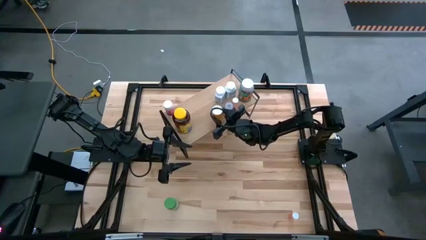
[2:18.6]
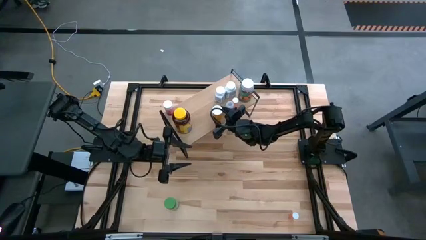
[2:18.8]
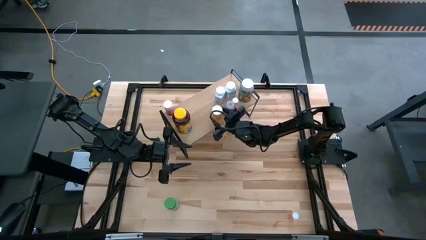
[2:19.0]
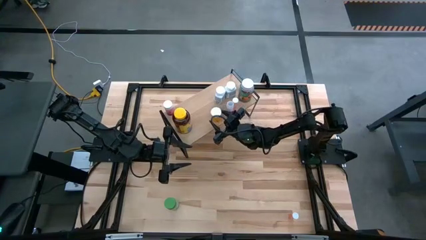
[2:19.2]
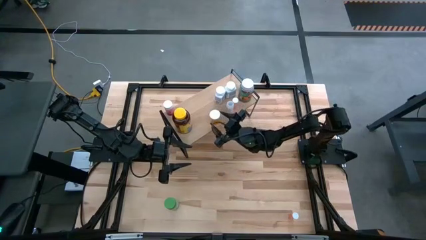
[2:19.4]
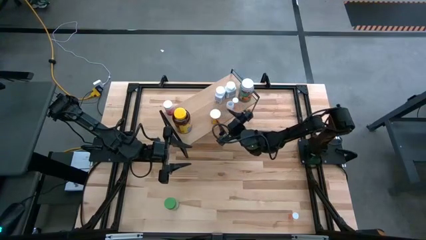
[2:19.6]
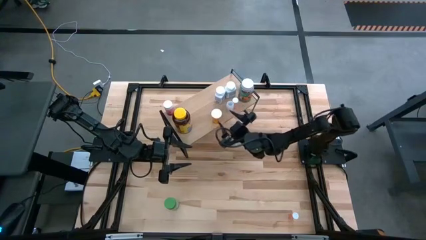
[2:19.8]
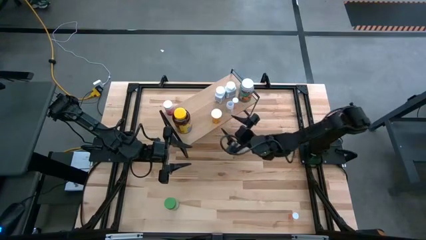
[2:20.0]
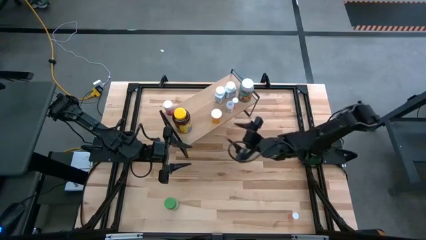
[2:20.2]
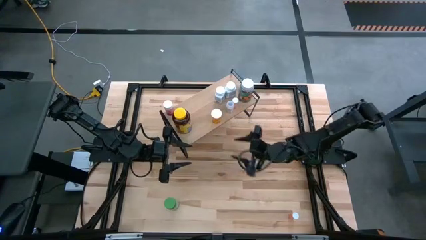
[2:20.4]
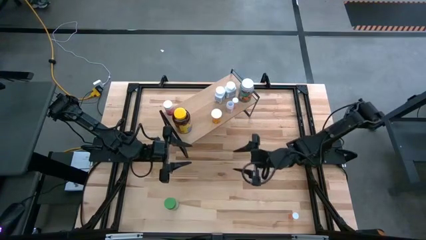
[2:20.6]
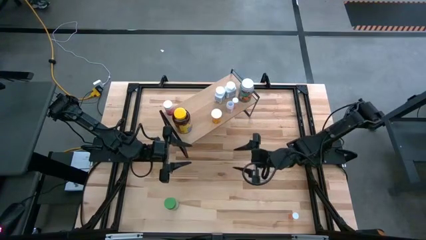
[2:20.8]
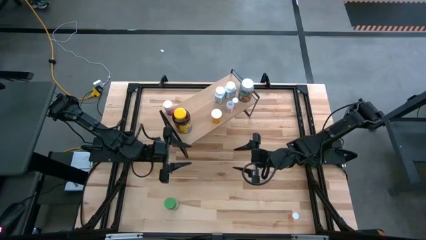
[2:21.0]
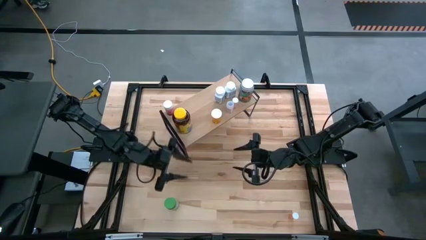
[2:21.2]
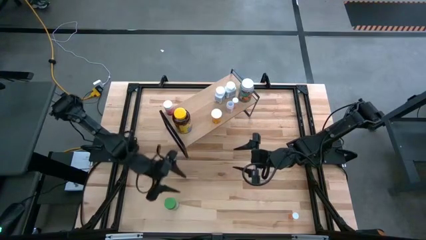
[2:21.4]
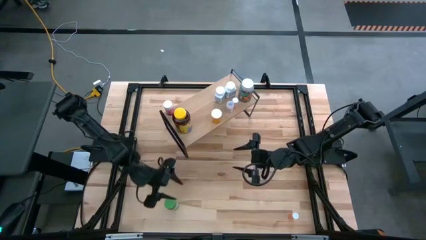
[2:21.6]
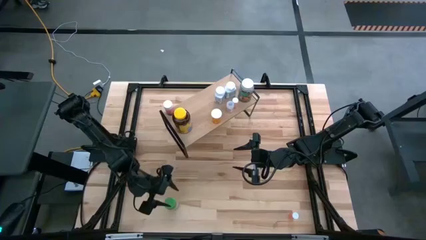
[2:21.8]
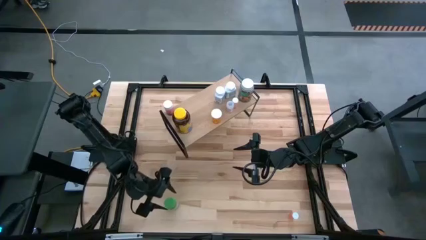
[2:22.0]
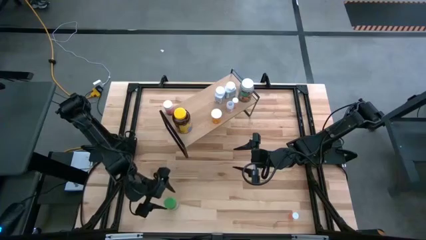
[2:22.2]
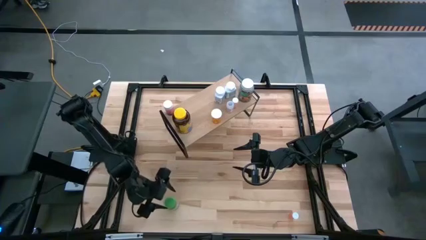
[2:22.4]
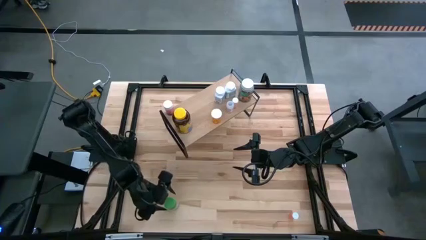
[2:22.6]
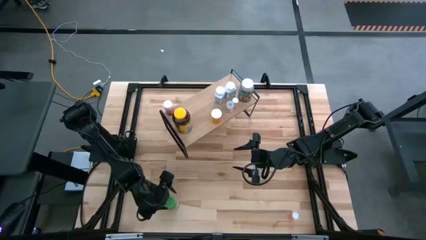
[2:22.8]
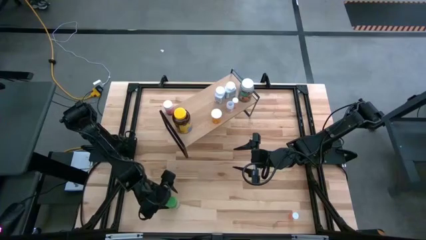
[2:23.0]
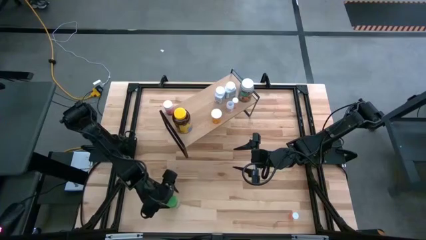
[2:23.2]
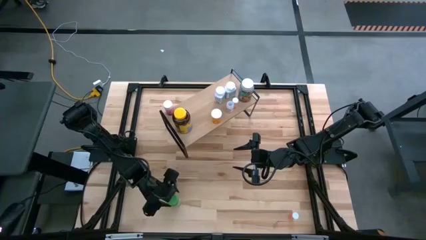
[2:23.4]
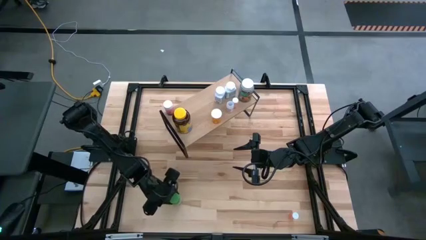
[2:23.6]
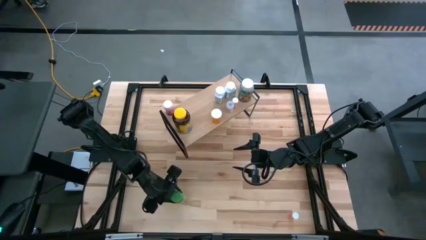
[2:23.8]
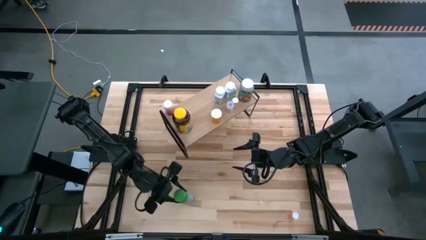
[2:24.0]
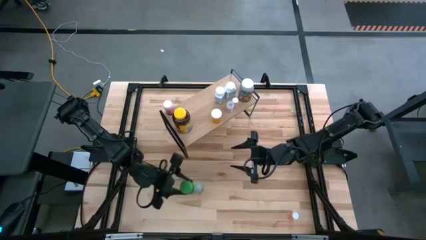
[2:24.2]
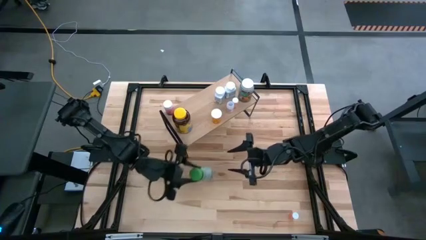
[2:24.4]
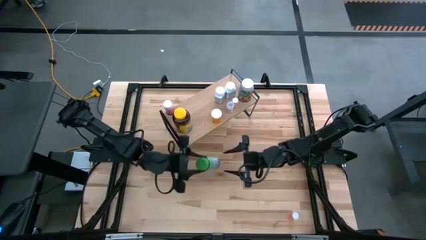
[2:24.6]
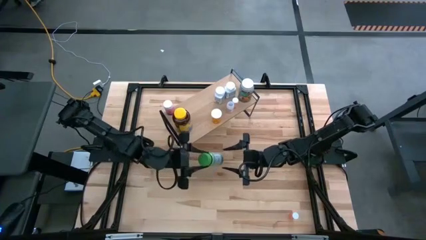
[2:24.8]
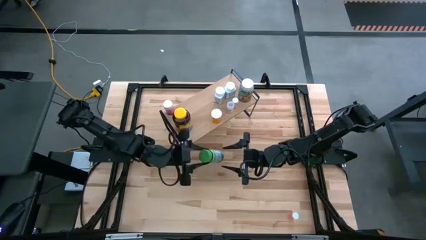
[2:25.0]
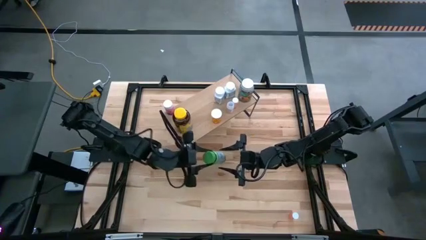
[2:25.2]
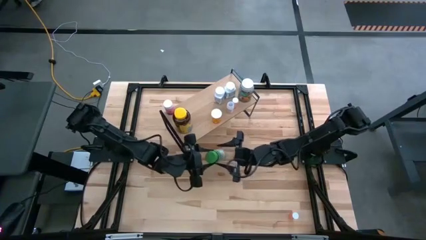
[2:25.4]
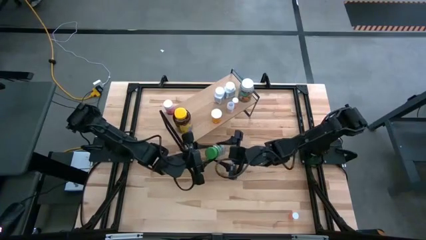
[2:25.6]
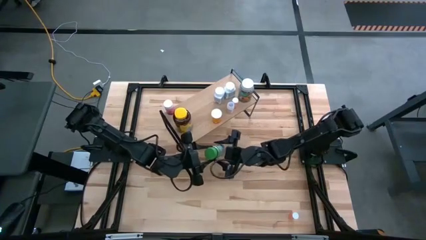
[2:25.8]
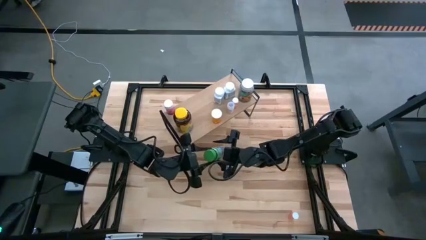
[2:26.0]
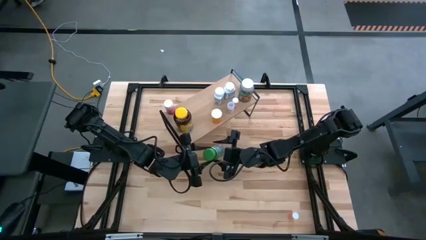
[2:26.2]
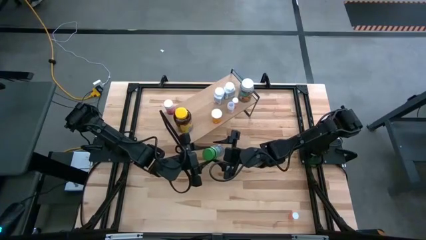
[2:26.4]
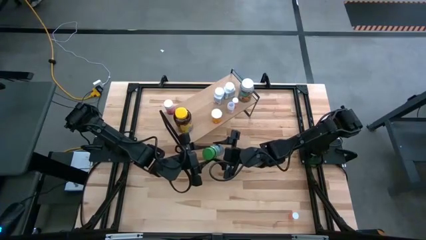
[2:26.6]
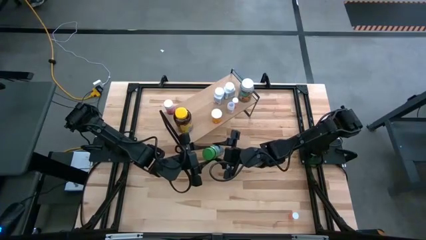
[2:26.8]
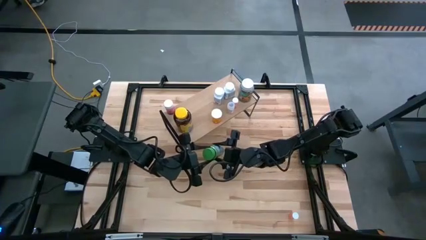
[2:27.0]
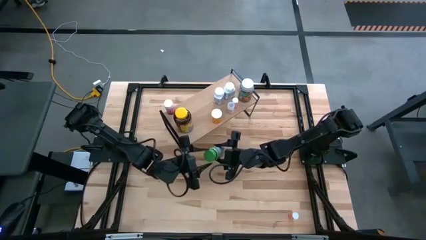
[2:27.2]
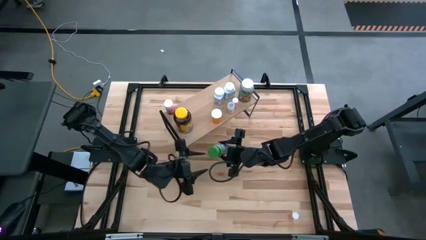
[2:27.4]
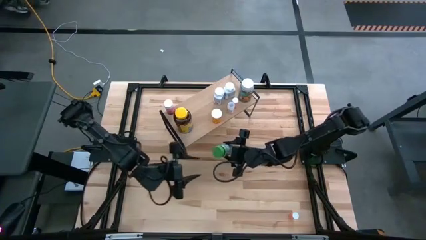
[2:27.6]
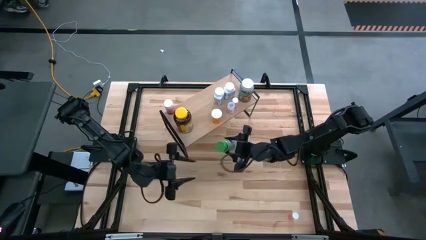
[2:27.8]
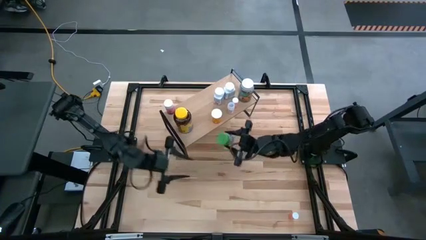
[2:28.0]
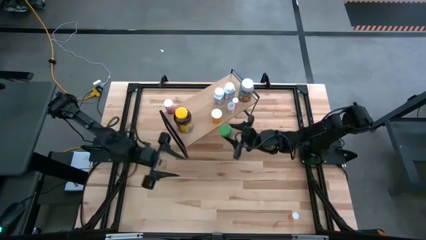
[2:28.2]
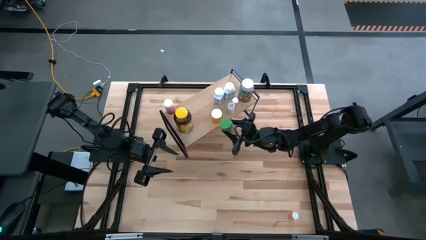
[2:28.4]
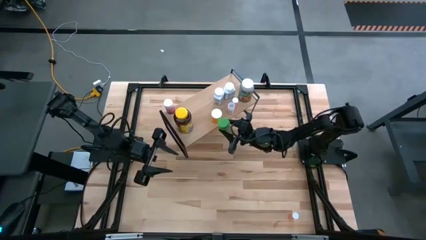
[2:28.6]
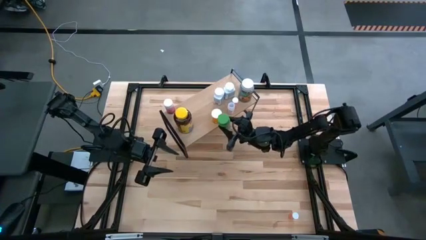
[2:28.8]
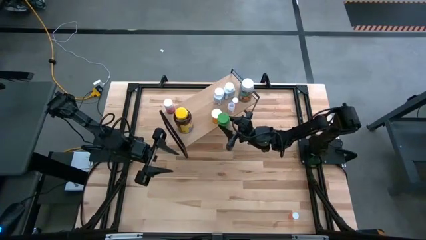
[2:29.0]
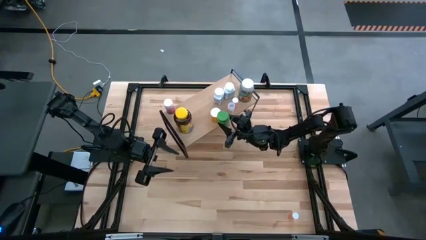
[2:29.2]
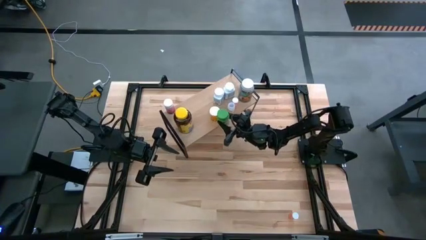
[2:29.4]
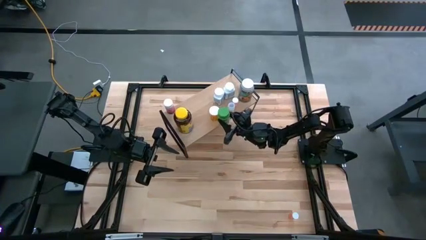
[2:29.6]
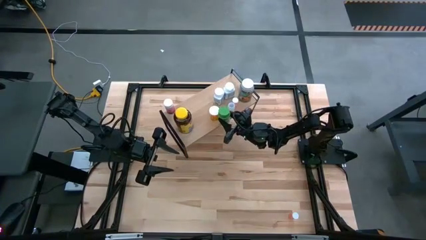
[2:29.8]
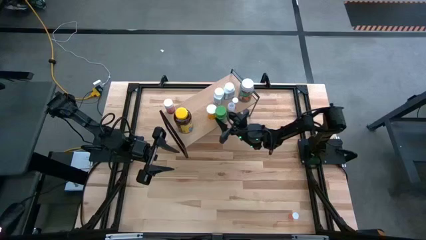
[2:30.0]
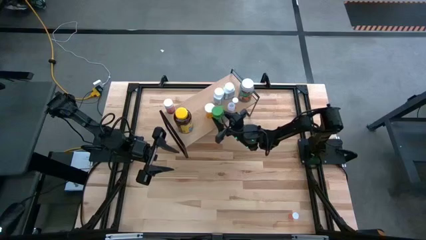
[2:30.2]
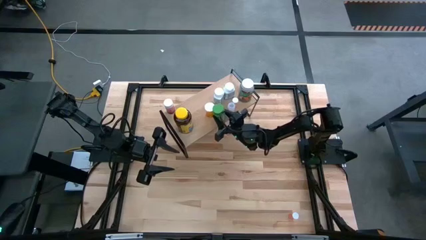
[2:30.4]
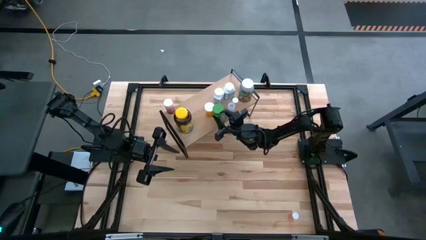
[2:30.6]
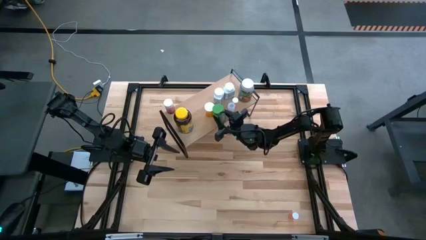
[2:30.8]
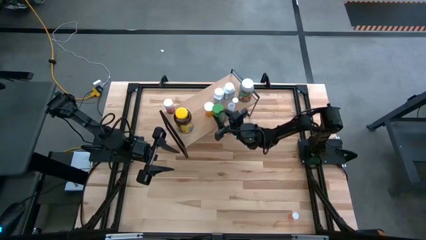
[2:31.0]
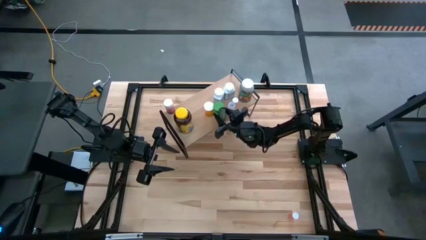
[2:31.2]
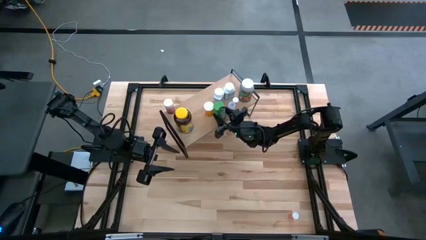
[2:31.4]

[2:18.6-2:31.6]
Task: Pick and place medicine bottles onto shelf by color
Put the dark green medicine bottle on the shelf

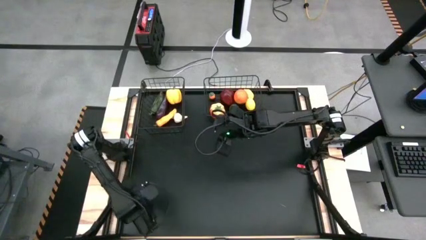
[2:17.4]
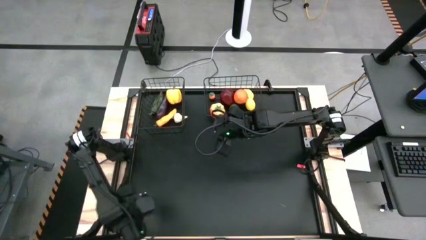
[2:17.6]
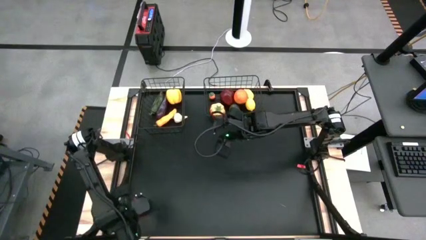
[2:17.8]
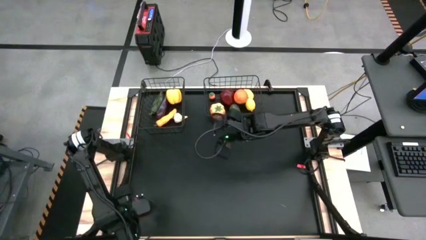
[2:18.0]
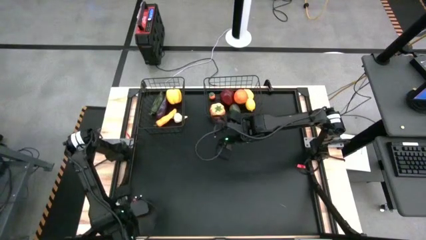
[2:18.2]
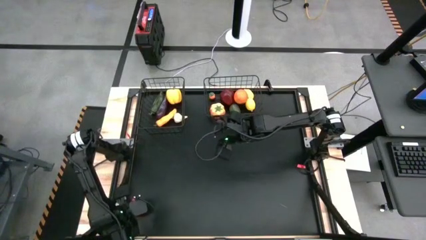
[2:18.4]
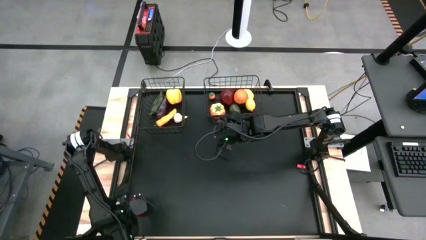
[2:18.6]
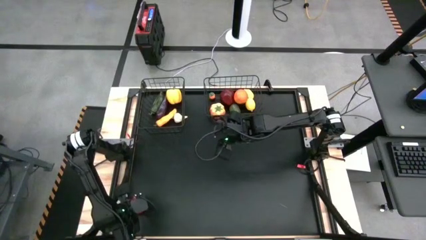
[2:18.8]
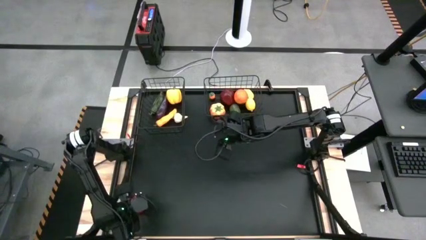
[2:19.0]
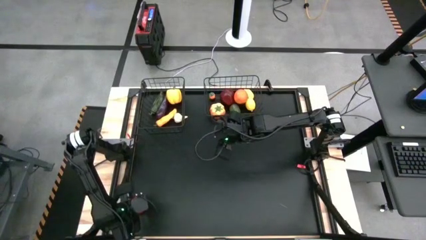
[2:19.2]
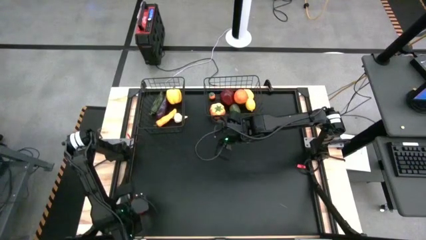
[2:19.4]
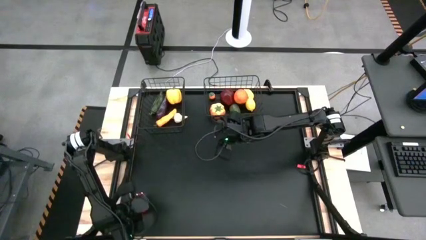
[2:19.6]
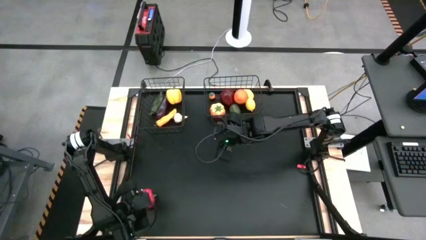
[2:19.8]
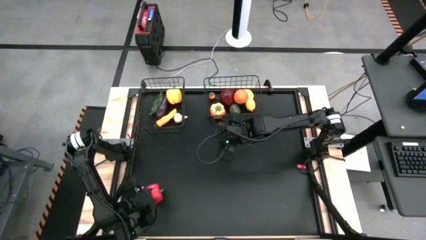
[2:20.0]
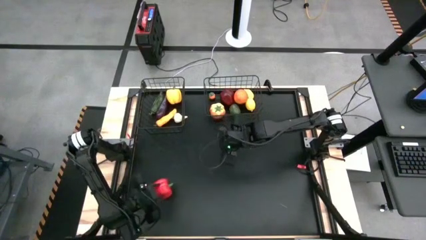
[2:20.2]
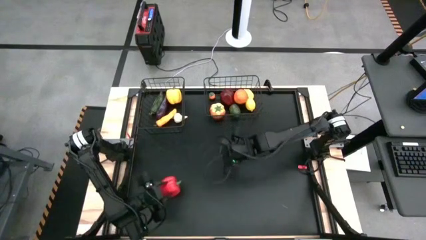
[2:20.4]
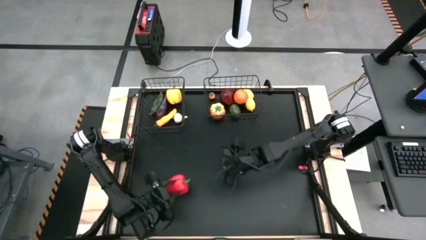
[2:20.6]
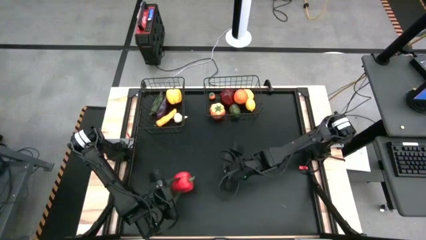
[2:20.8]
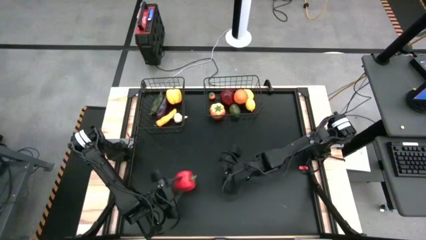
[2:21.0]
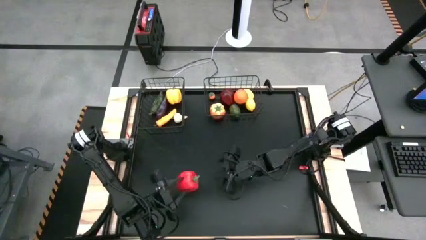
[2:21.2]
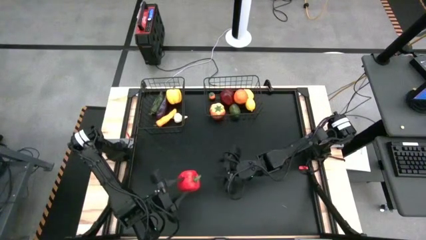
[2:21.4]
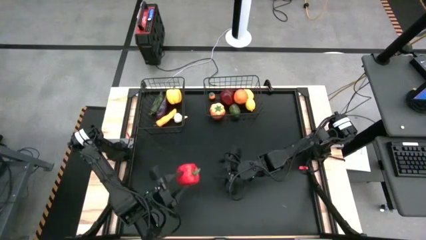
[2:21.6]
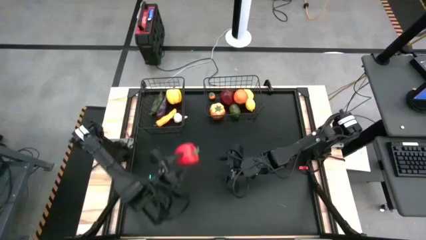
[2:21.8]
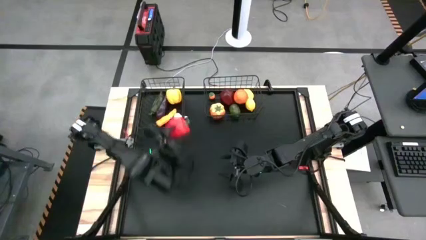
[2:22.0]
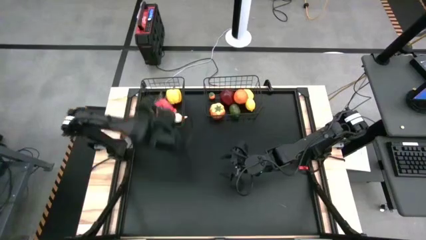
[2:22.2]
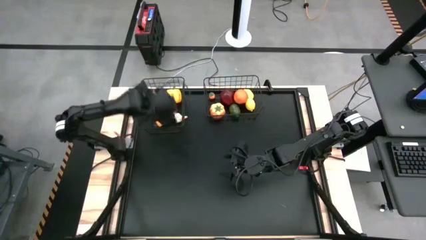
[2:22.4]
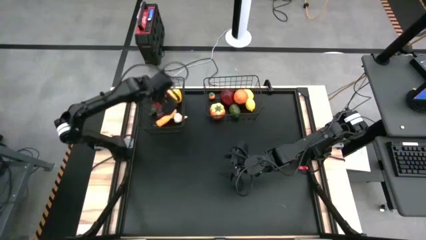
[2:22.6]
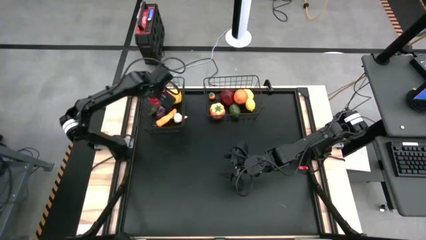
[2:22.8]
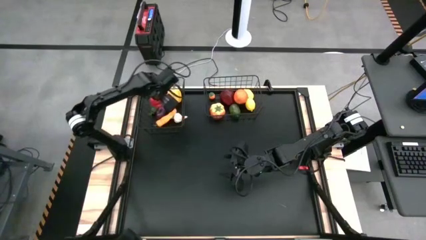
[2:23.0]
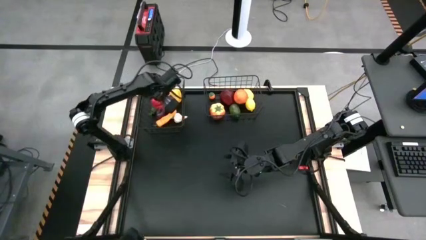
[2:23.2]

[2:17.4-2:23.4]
Task: Sort produce into baskets
Put the red bell pepper into the left black wire basket
